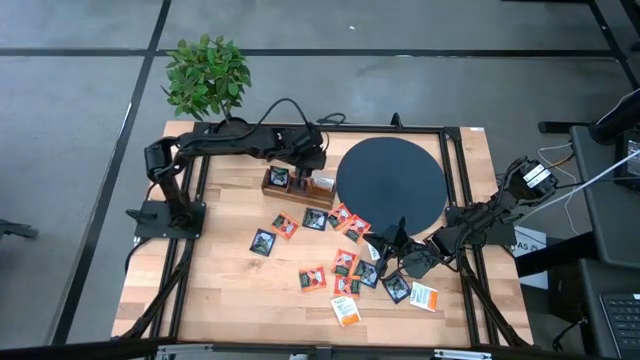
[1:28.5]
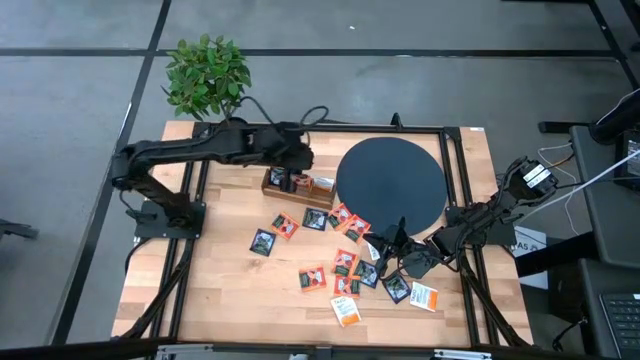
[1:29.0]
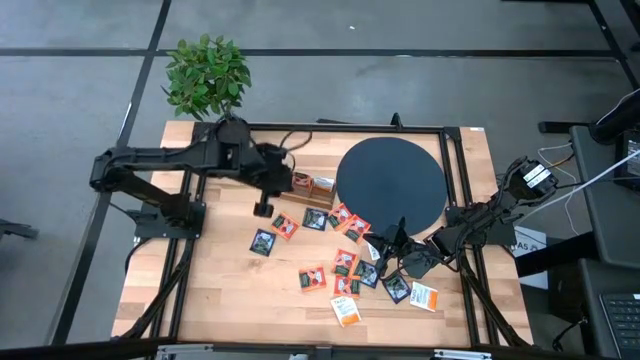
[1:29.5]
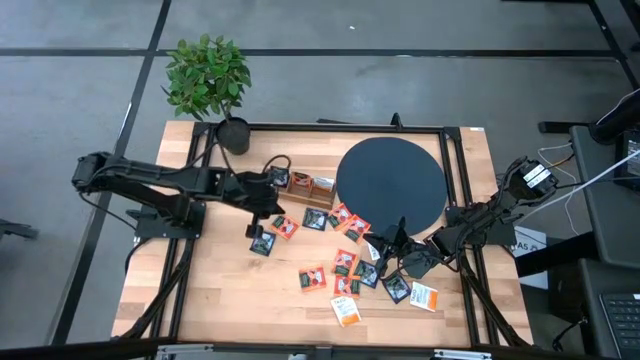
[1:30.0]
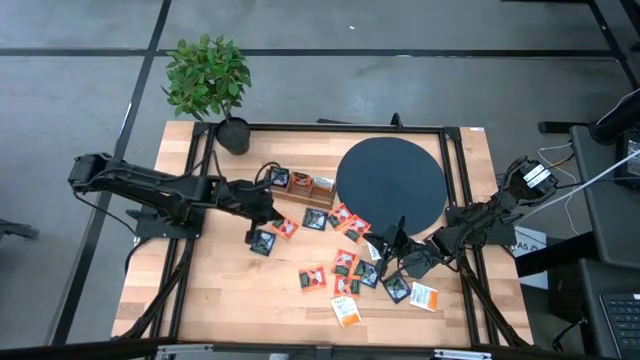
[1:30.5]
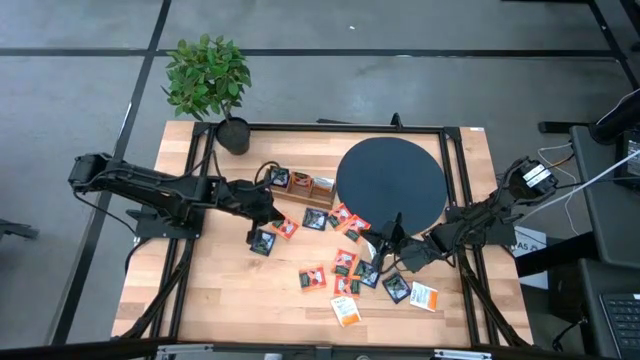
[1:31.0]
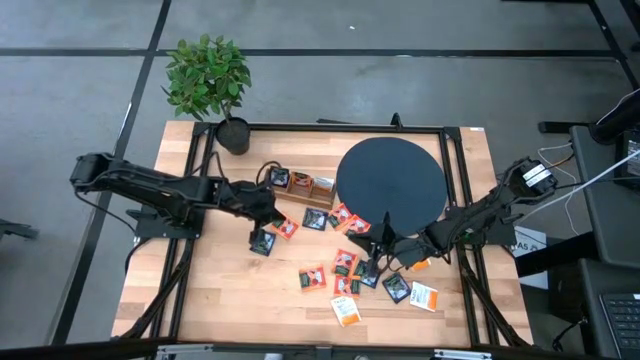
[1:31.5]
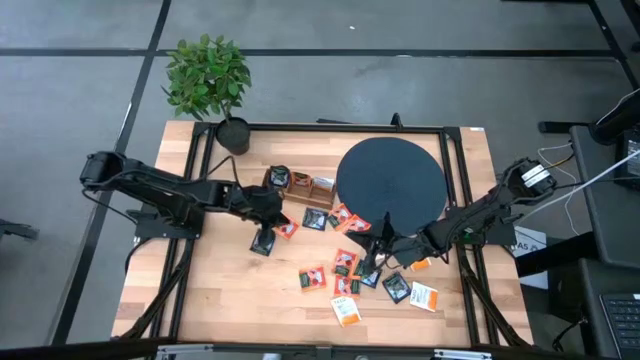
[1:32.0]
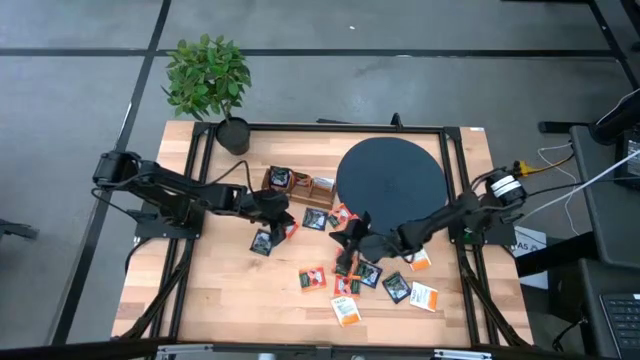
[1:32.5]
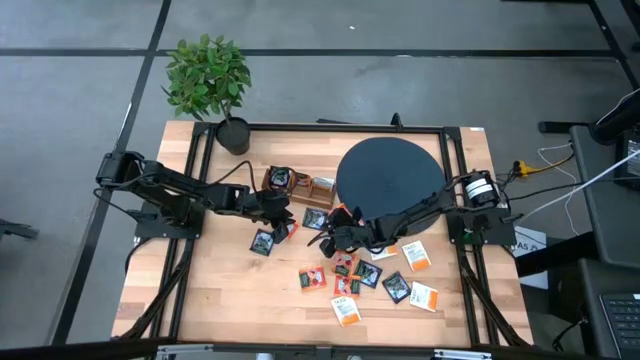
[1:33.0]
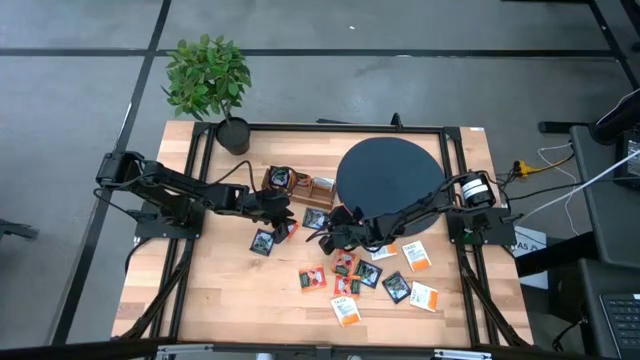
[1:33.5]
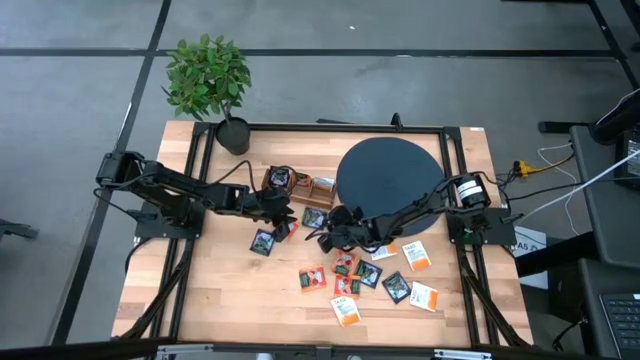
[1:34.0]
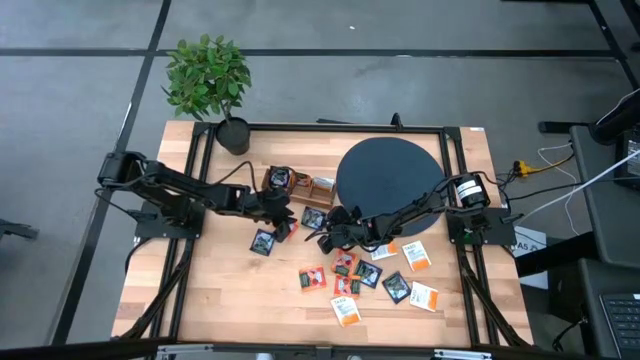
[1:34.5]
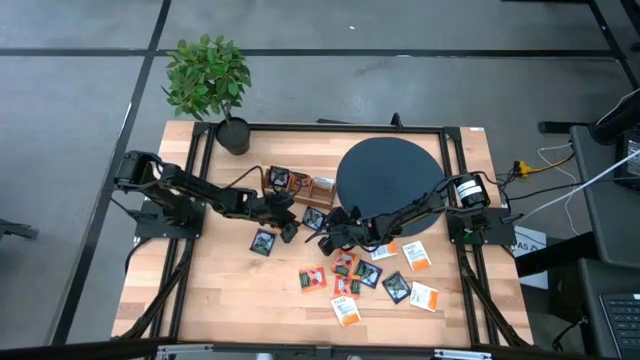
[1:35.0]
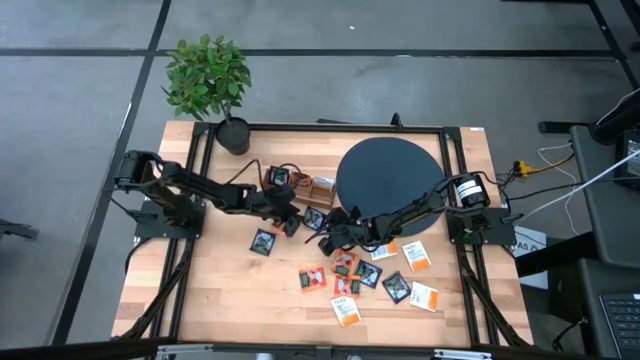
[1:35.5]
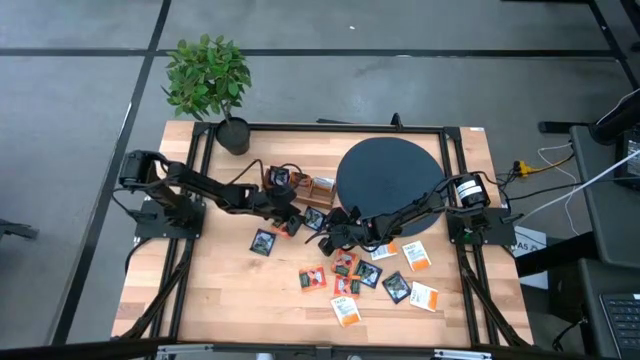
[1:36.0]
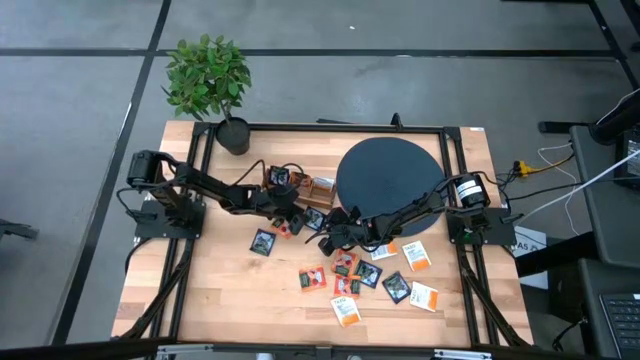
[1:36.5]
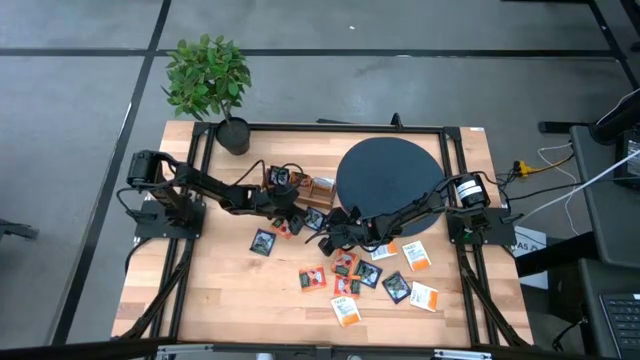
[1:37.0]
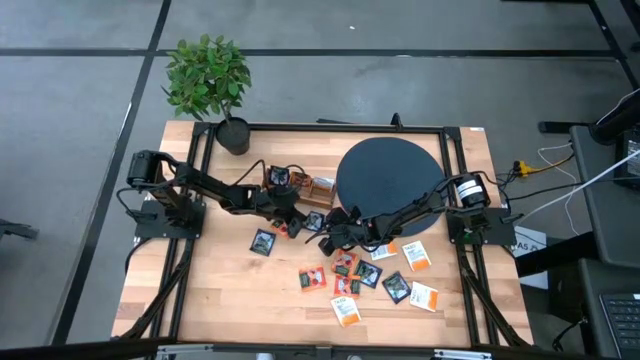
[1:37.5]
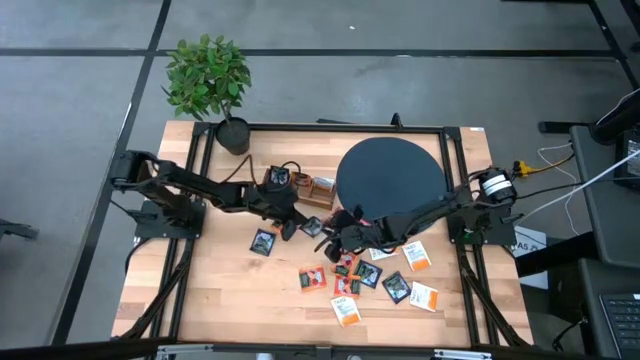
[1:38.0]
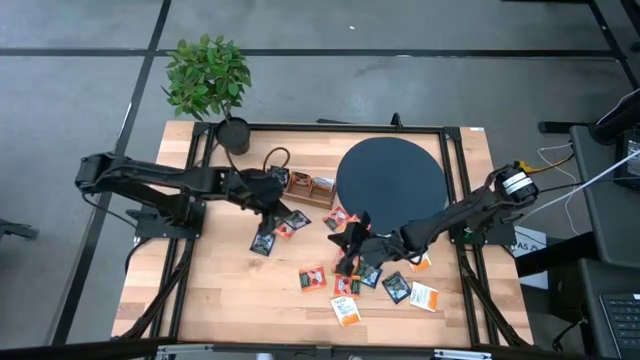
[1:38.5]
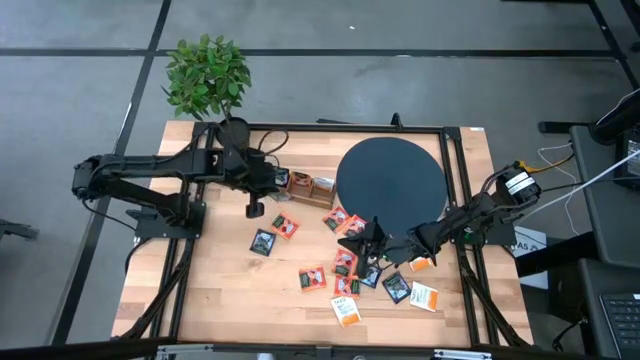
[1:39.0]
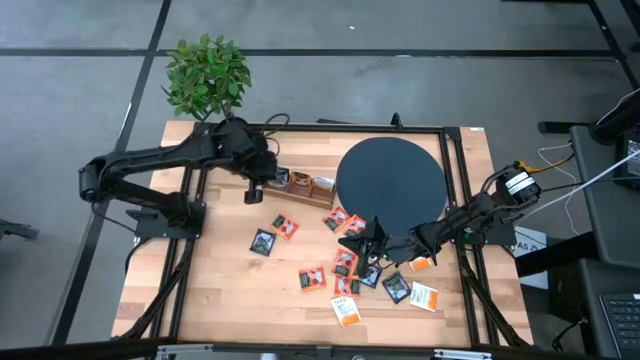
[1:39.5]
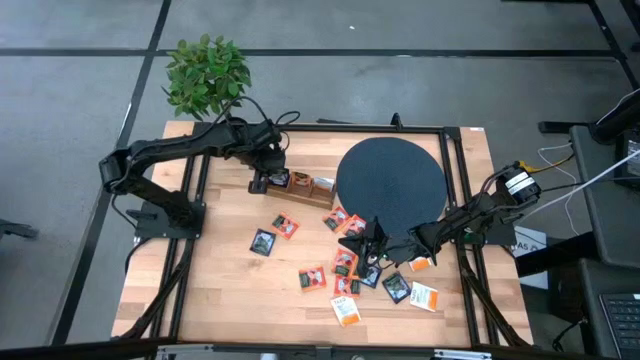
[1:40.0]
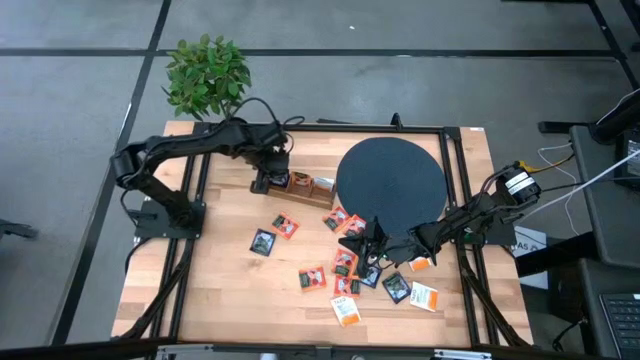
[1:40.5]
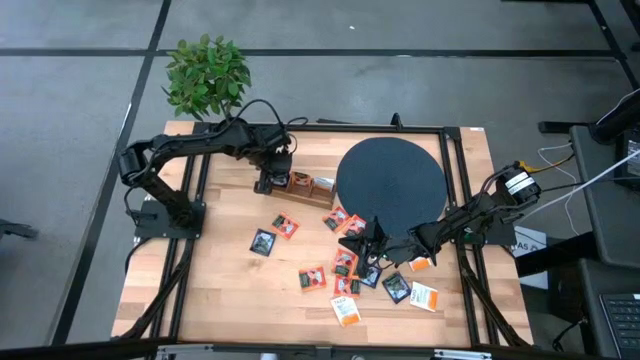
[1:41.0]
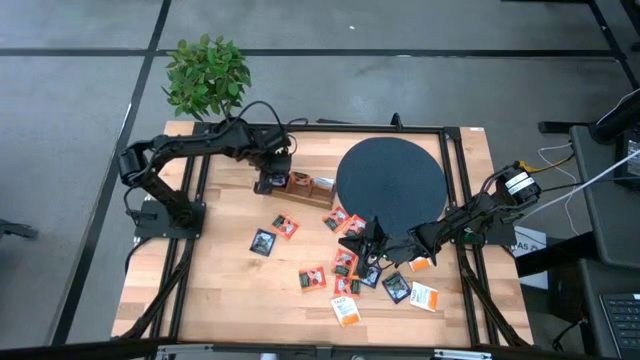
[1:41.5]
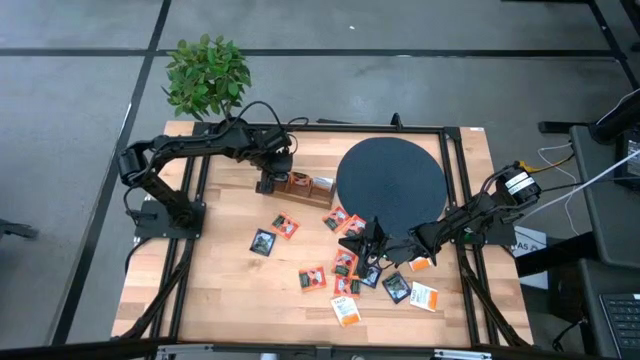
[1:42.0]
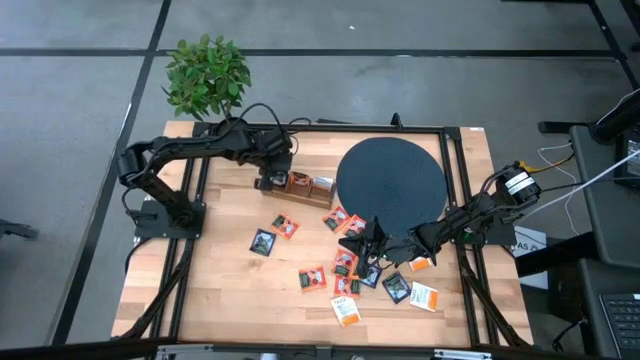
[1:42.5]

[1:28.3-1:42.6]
Task: Pick & Place Tea
Put the dark blue tea bag into the left section of the wooden organizer

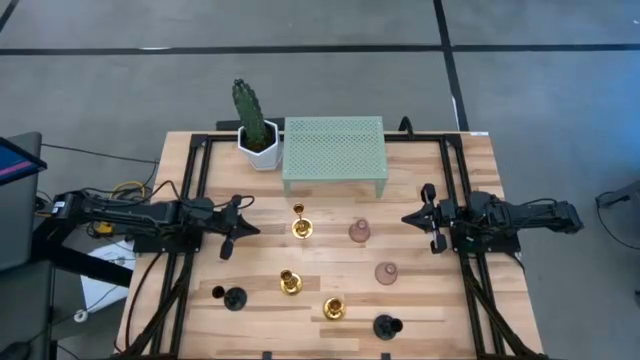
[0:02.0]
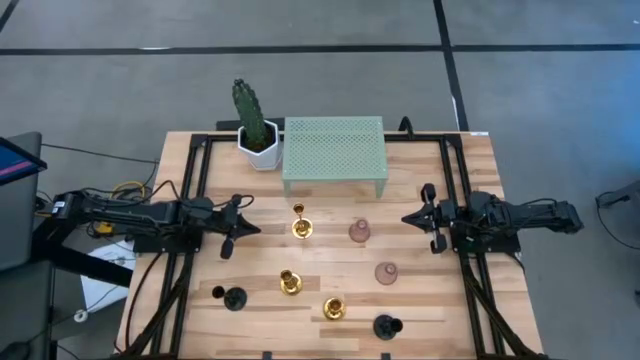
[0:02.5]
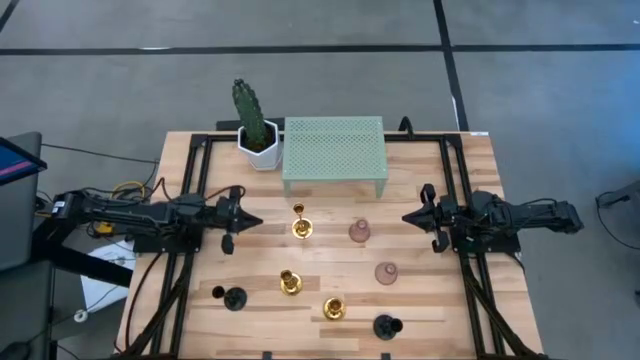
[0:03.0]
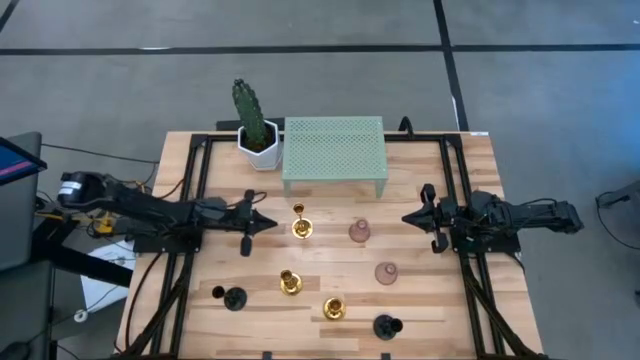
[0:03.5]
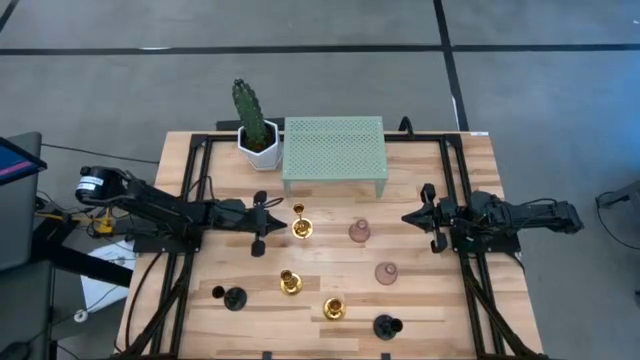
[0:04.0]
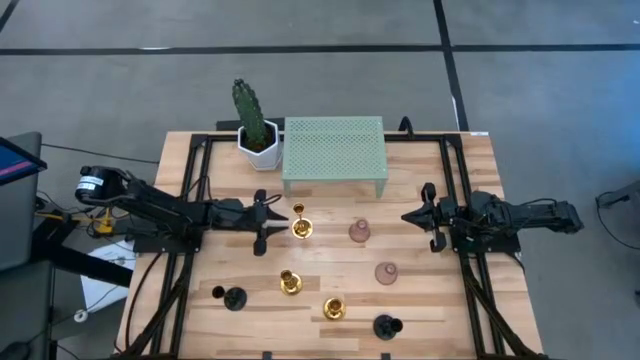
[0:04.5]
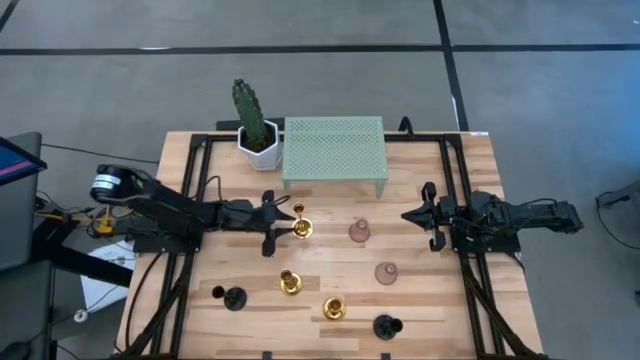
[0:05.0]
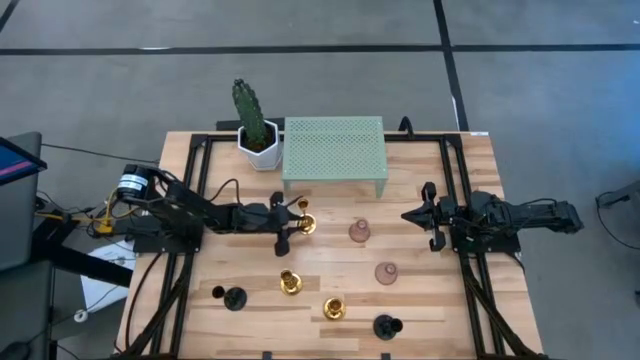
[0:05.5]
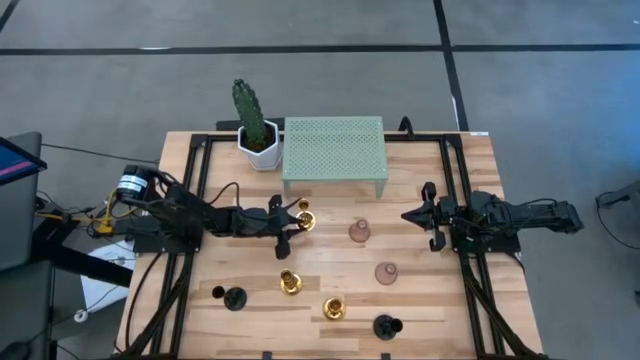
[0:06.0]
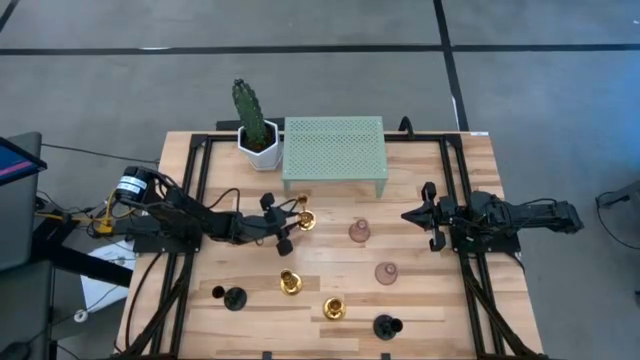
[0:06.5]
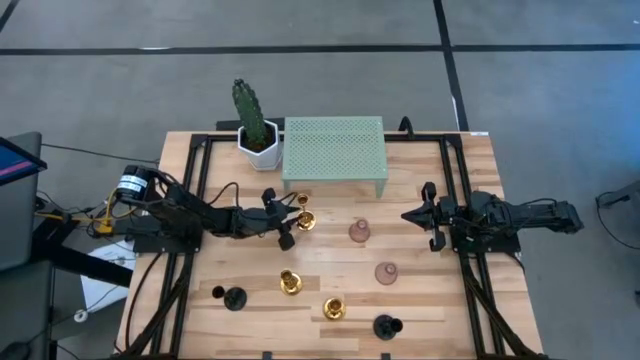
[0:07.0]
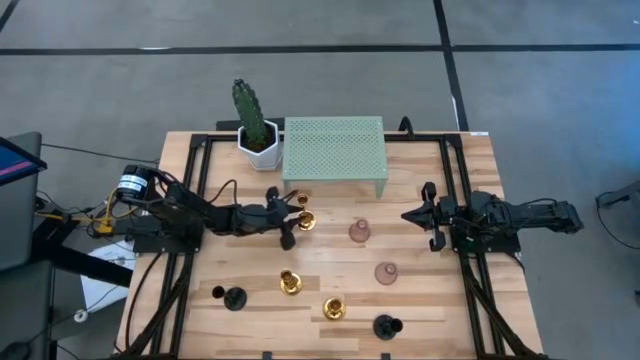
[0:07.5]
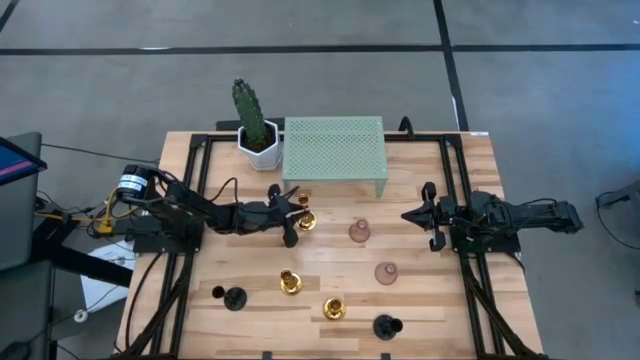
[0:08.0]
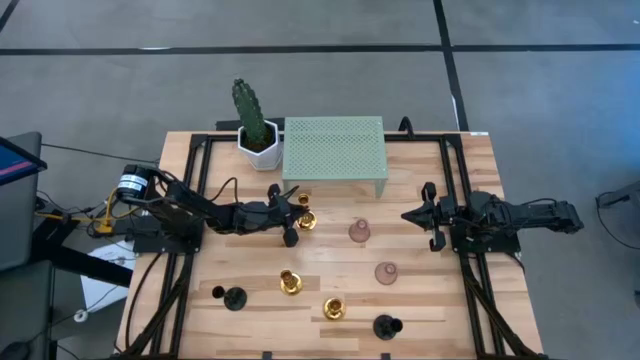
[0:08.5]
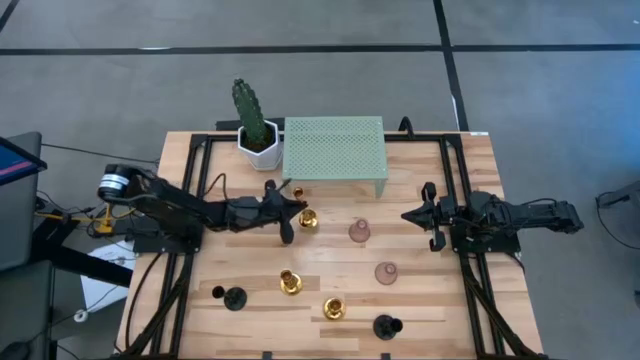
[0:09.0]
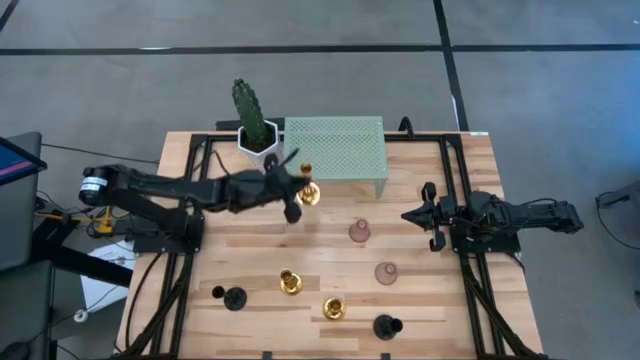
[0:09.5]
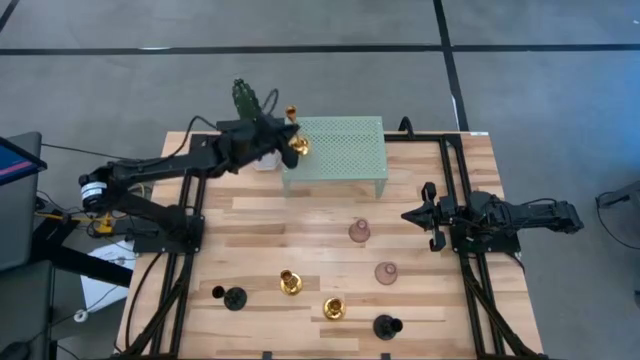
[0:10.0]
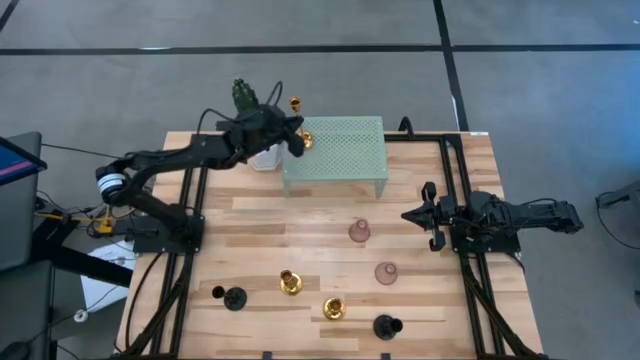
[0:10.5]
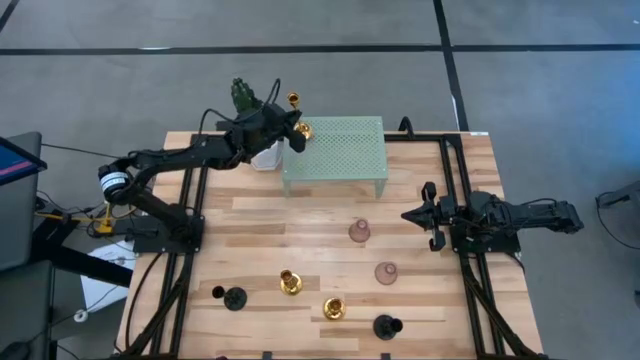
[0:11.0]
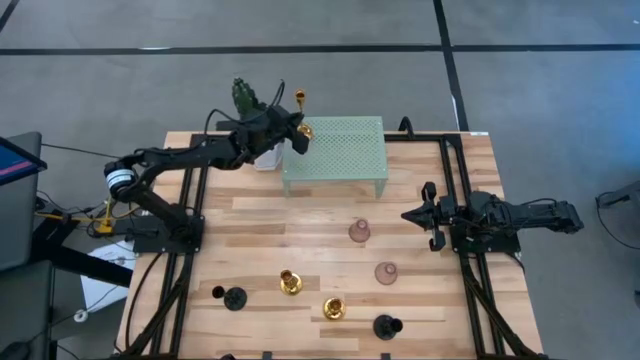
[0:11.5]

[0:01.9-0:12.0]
Task: Pick & Place candle stick holders
Put the top gold candle holder on the shelf
